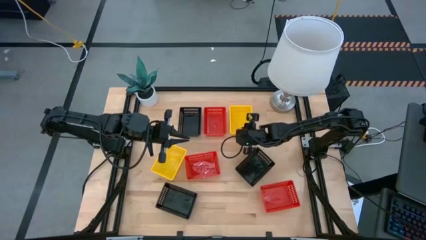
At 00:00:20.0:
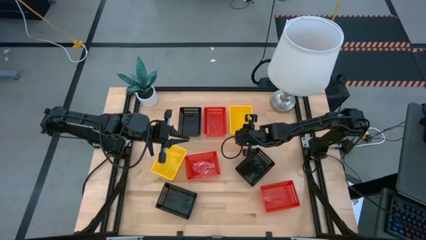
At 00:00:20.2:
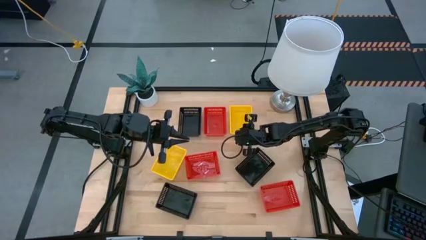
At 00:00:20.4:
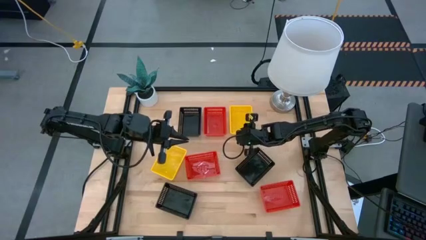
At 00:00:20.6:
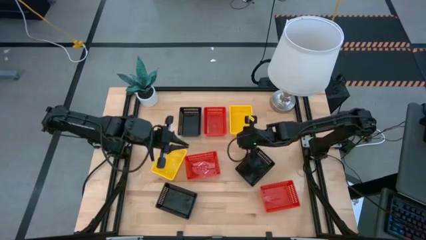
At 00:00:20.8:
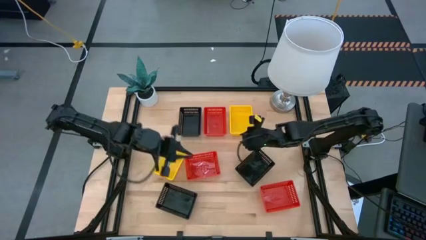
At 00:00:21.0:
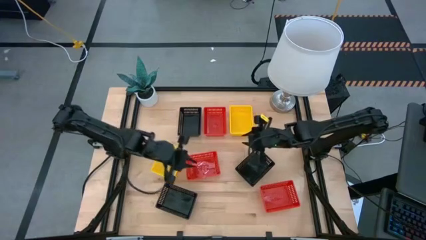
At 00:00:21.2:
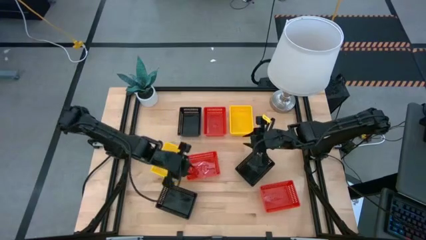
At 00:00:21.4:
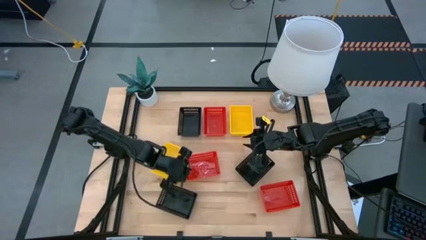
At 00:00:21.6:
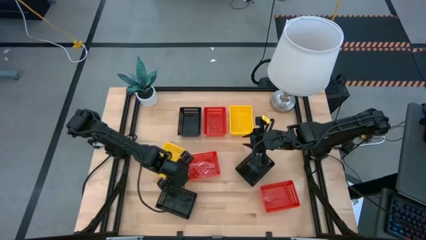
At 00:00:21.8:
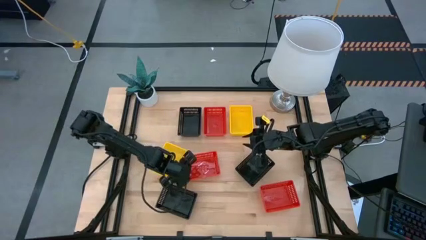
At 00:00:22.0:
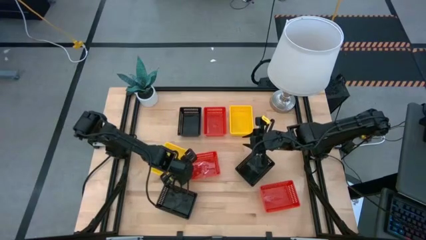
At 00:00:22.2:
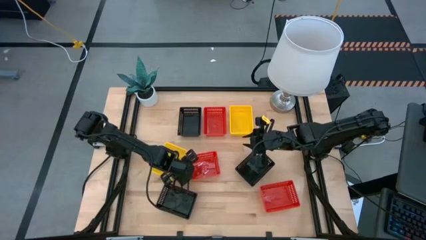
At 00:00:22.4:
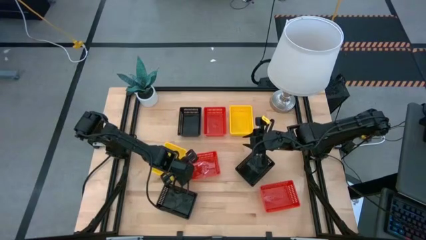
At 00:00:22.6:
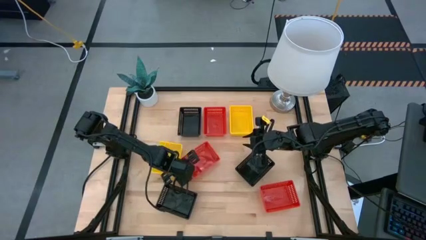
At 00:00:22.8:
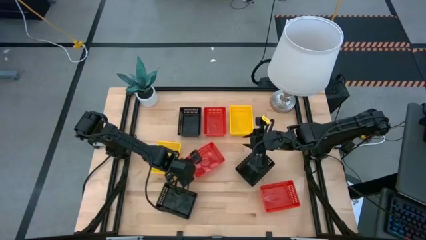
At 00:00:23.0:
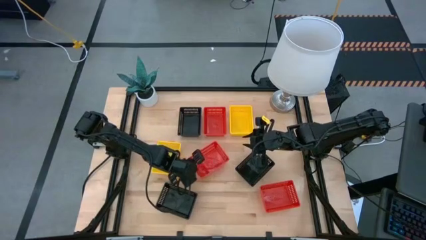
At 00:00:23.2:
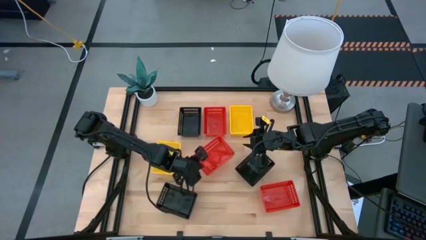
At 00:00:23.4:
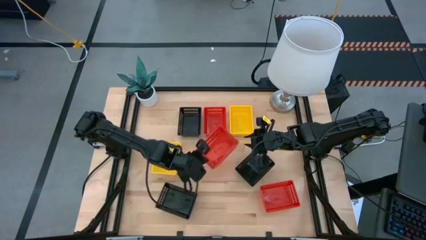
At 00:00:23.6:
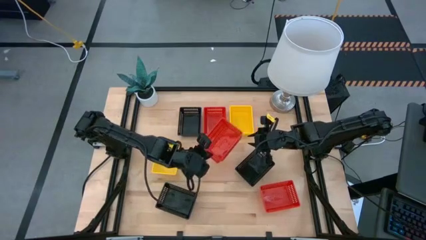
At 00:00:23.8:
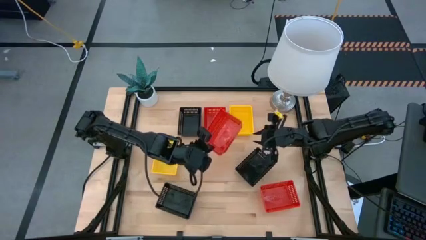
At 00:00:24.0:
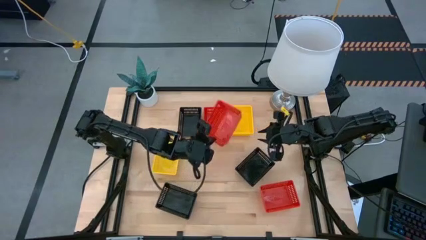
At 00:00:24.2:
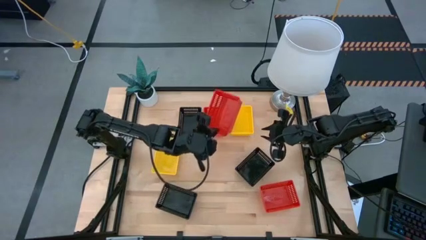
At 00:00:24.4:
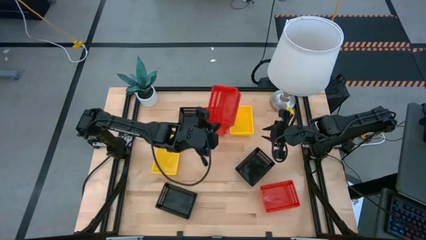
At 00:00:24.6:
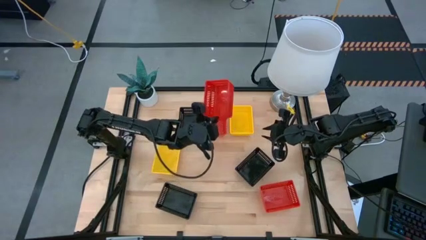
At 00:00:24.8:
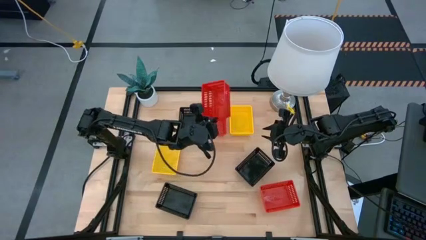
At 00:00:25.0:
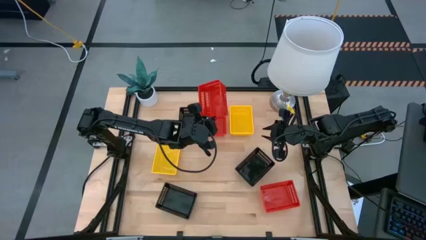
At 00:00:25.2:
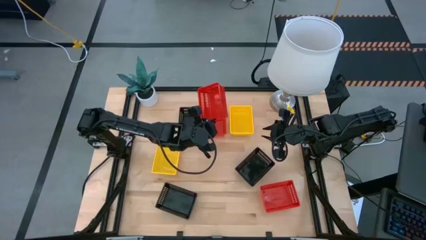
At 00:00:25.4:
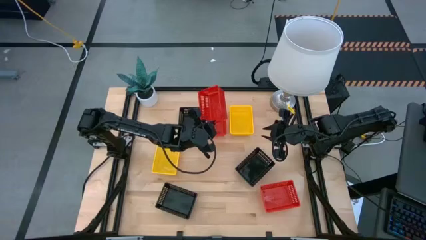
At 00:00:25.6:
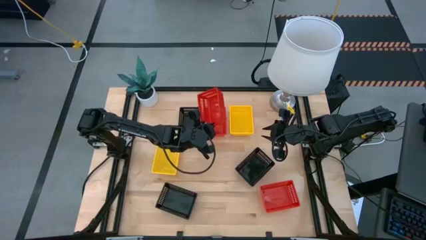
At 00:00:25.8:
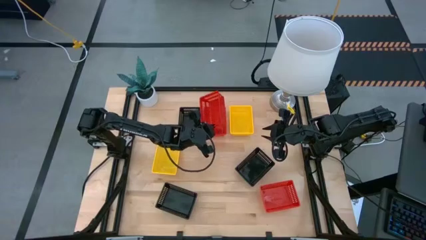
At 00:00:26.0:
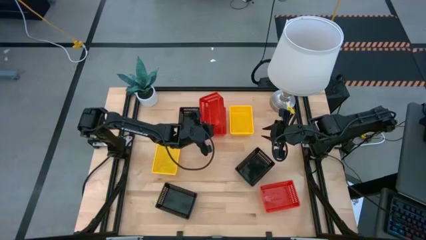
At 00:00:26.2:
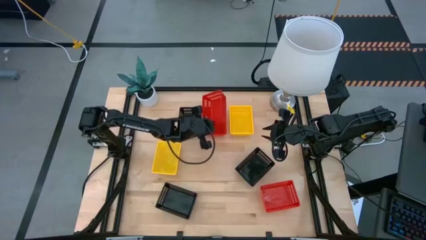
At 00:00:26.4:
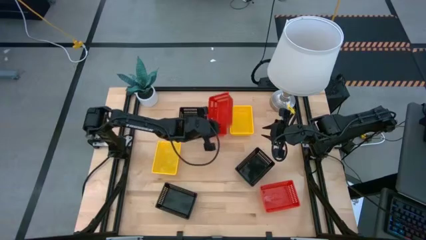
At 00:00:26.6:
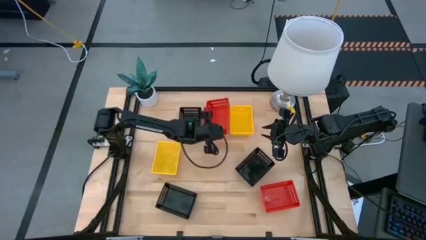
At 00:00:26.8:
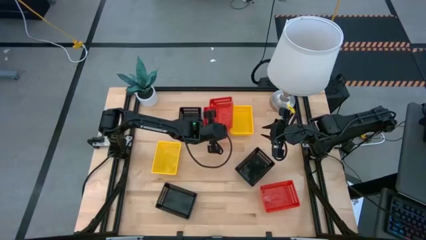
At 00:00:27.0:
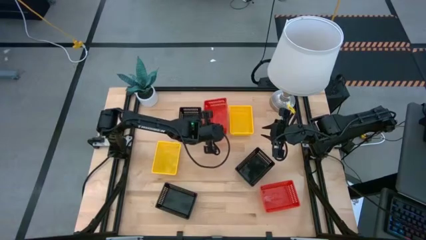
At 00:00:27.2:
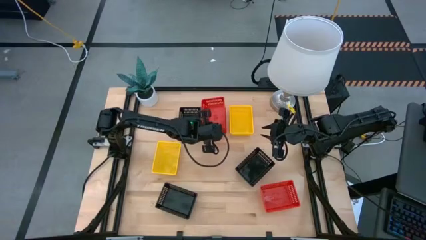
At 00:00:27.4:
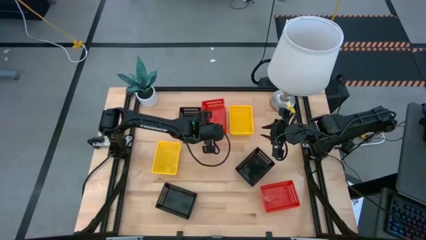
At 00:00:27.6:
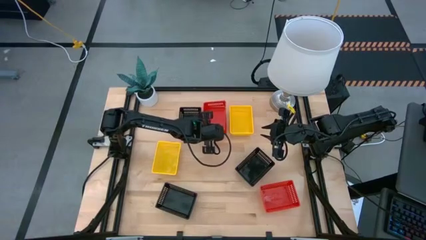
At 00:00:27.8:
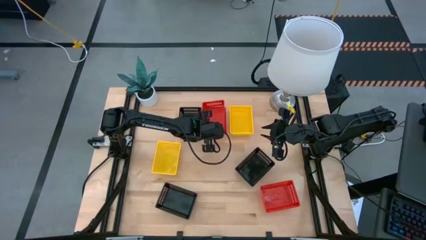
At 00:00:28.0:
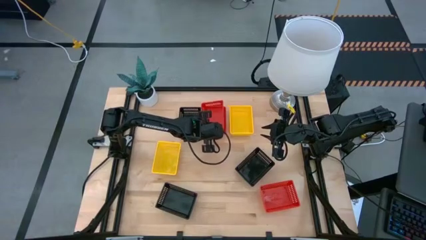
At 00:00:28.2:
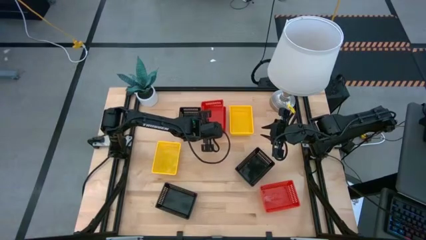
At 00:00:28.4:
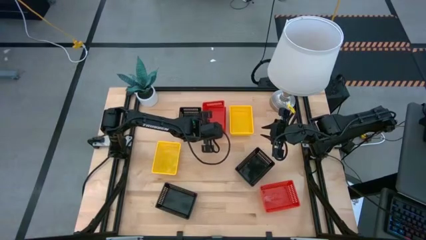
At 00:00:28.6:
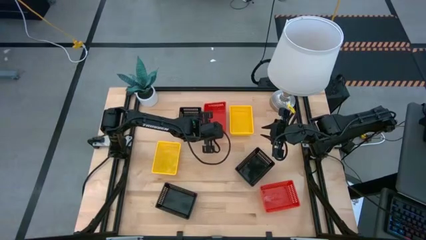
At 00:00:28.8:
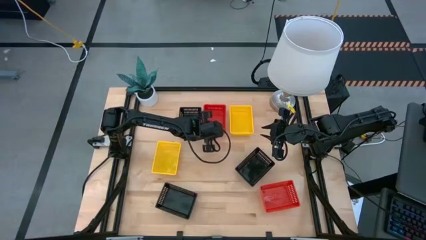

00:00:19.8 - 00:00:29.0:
Stack the middle left red bin on the top left red bin
